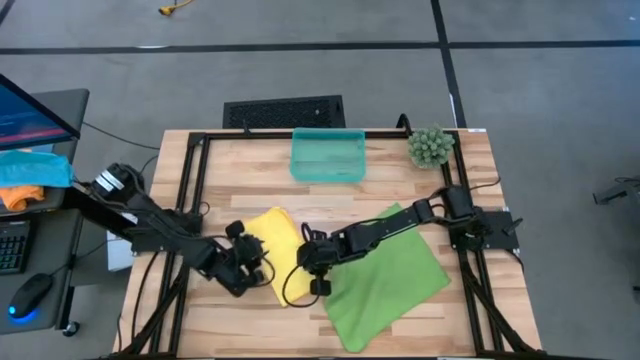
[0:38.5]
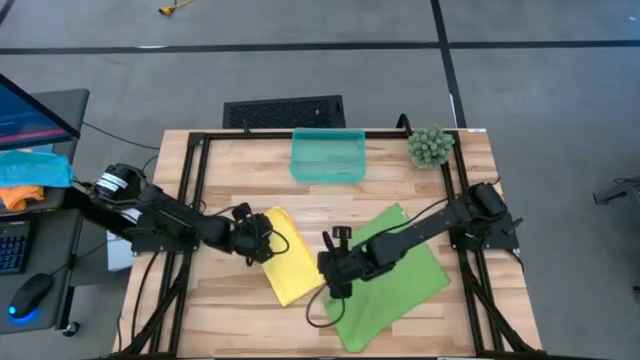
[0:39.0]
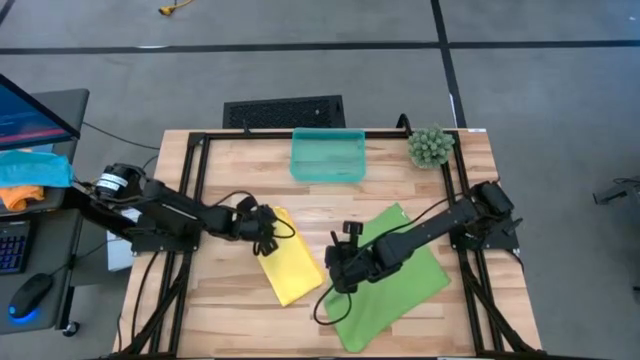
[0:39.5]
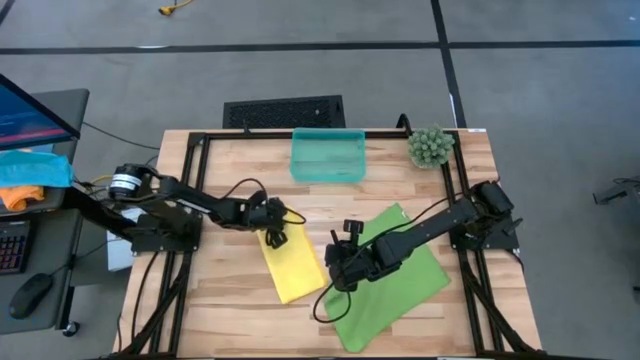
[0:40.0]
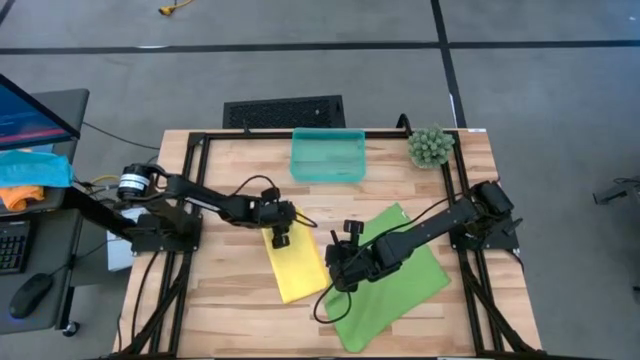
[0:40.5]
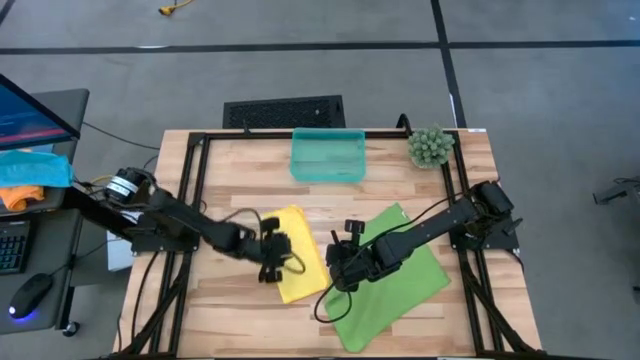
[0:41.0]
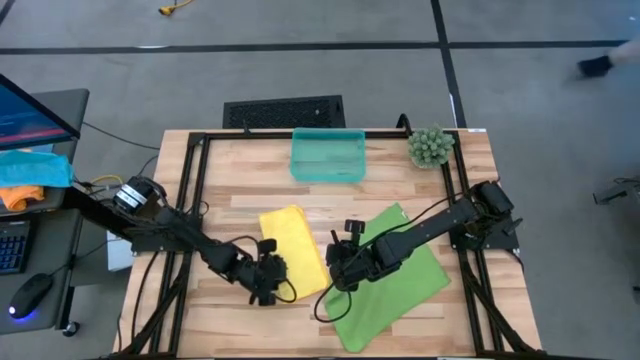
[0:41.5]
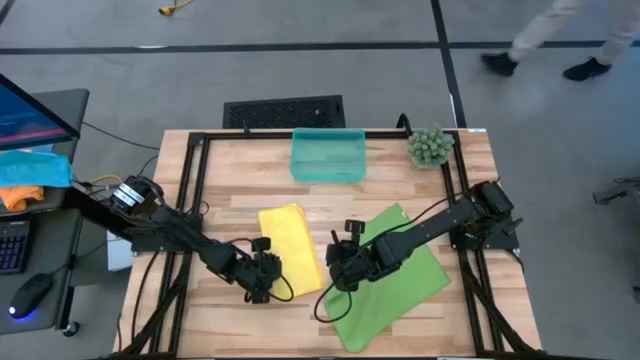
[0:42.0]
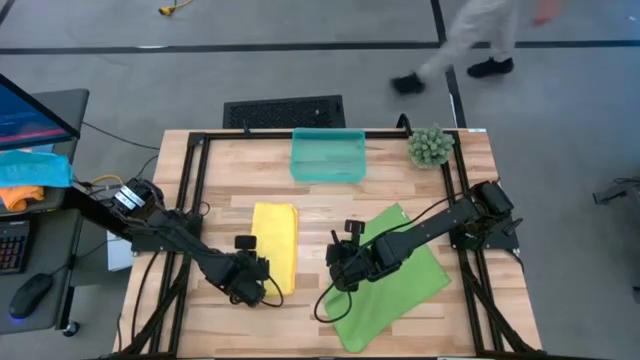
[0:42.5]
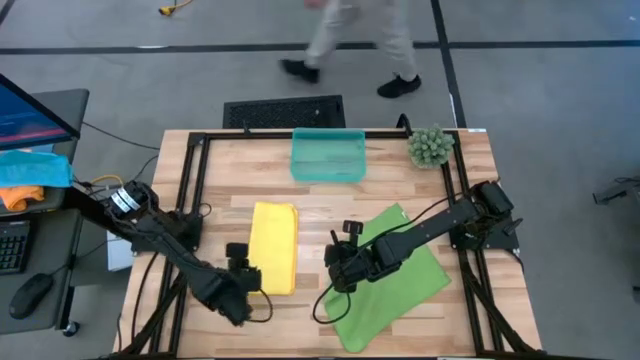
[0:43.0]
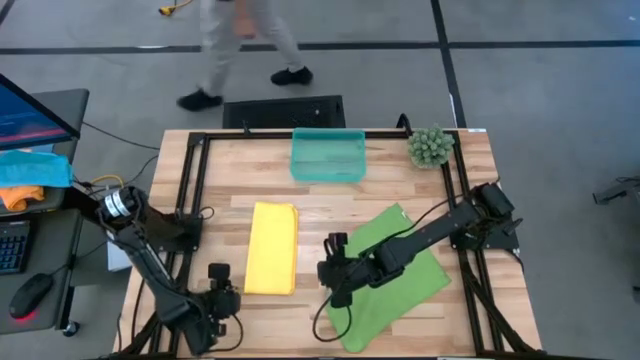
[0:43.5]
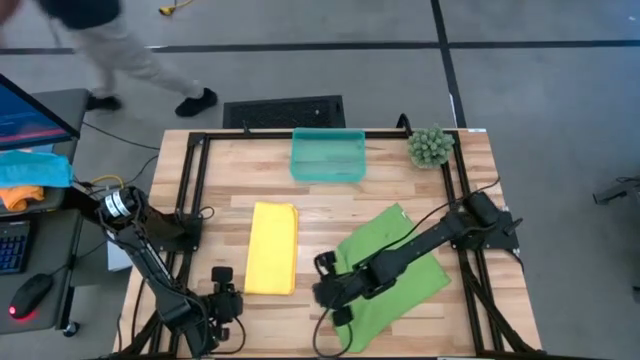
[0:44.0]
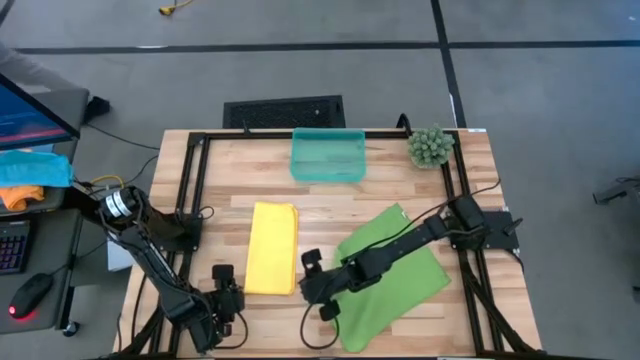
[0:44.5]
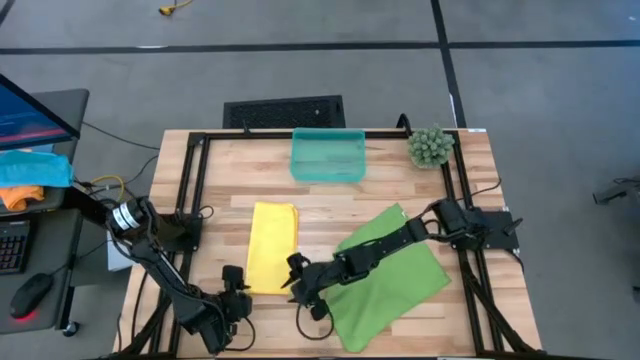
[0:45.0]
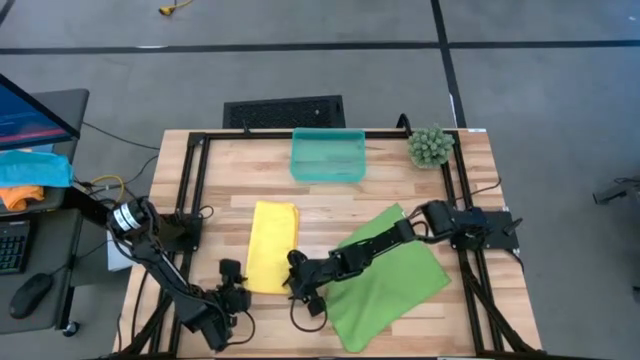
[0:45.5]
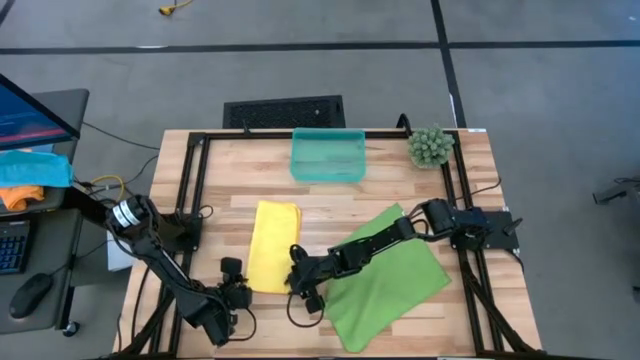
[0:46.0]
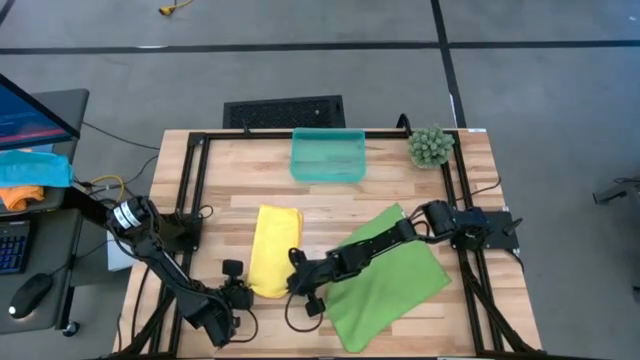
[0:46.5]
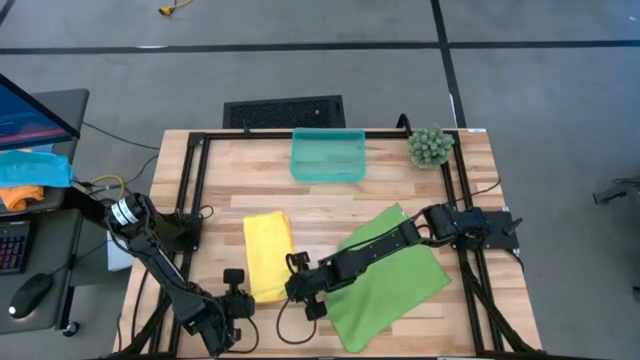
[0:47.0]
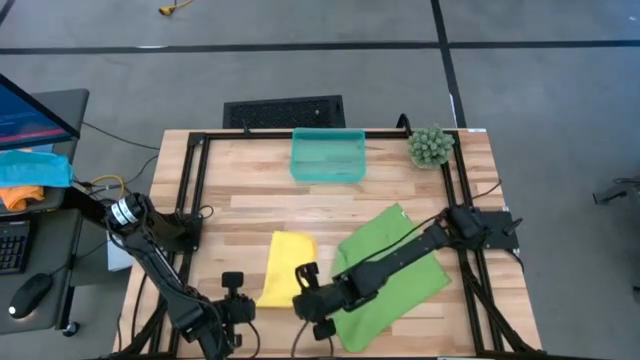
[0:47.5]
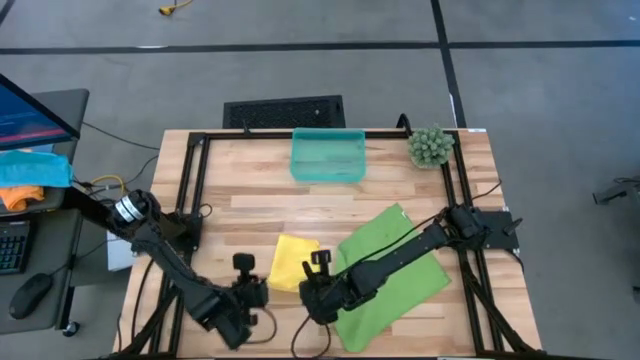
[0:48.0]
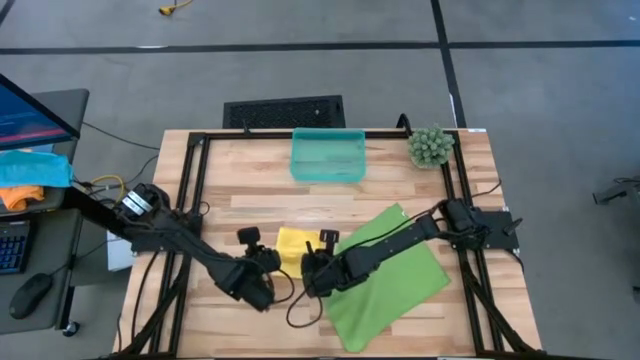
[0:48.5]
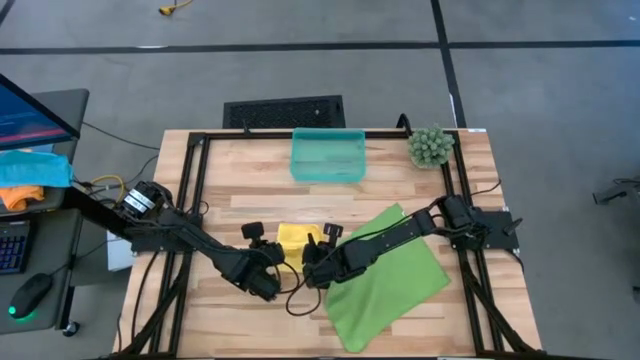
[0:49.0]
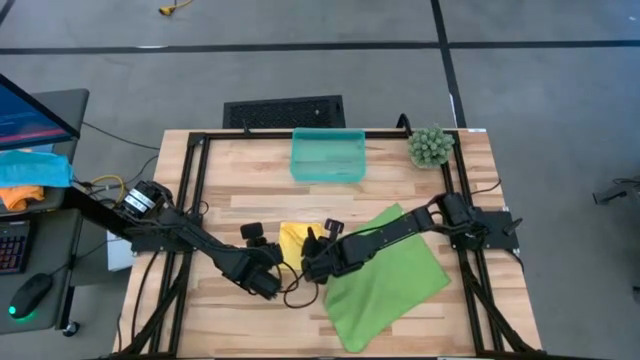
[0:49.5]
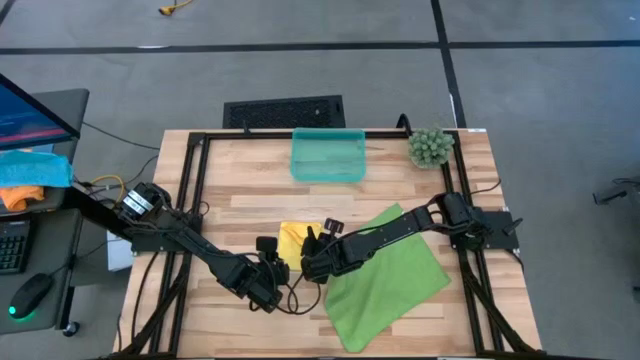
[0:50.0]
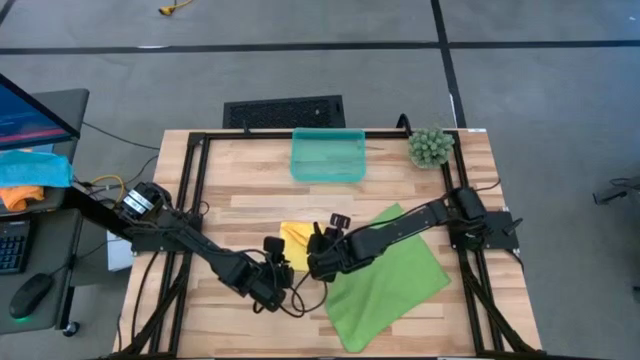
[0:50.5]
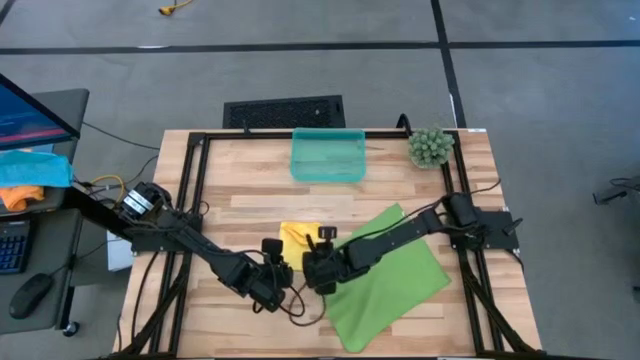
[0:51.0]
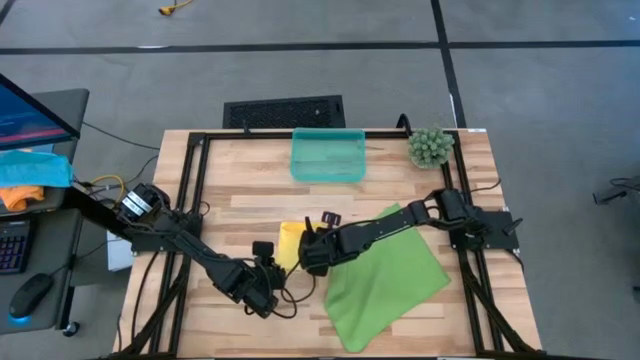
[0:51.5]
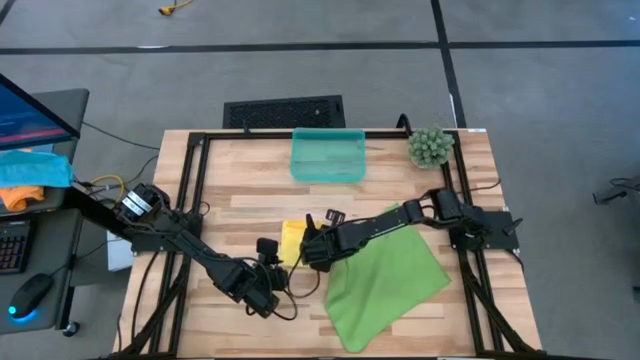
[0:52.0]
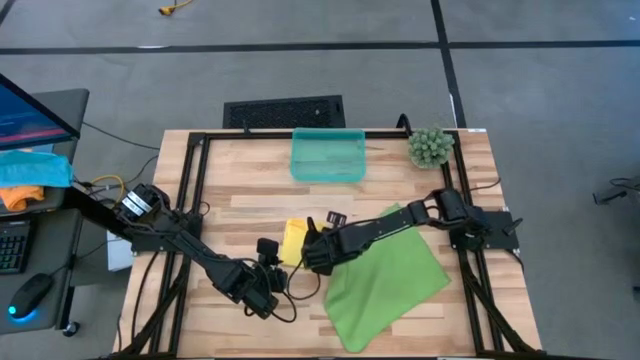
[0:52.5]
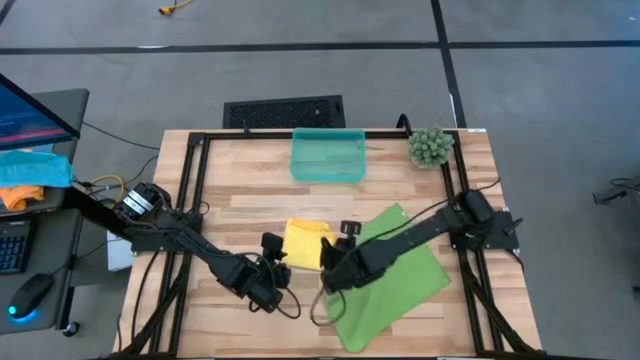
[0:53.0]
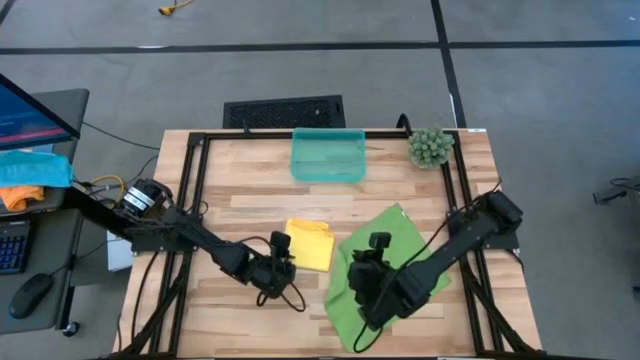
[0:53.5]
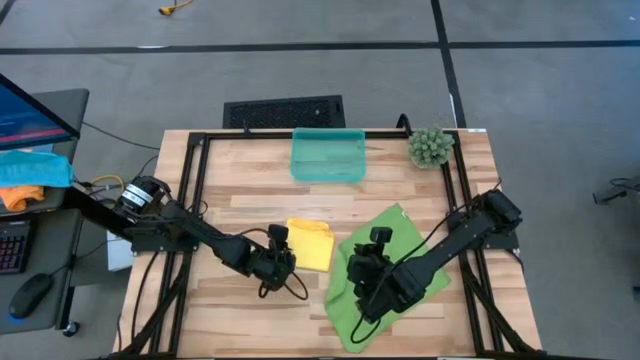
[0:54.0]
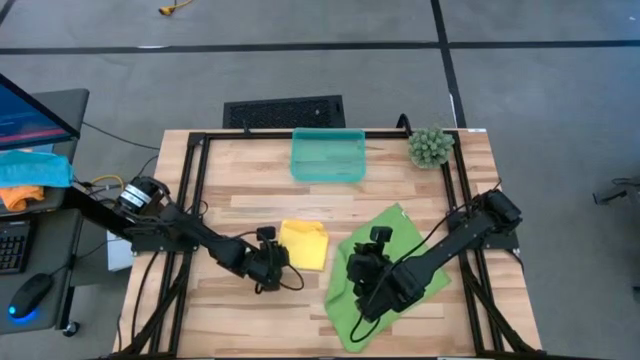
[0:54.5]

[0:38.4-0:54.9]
Task: Roll microfiber towels into tight, uniform cylinder then place into a basket
Fold the yellow microfiber towel

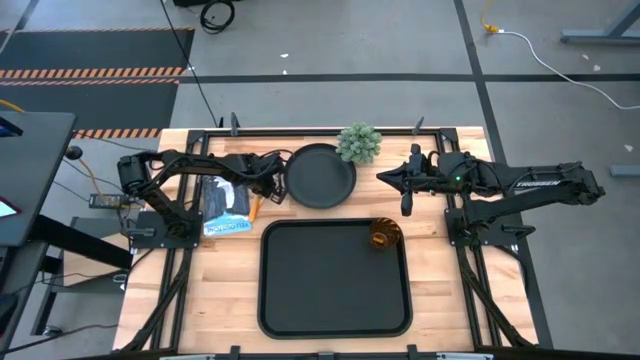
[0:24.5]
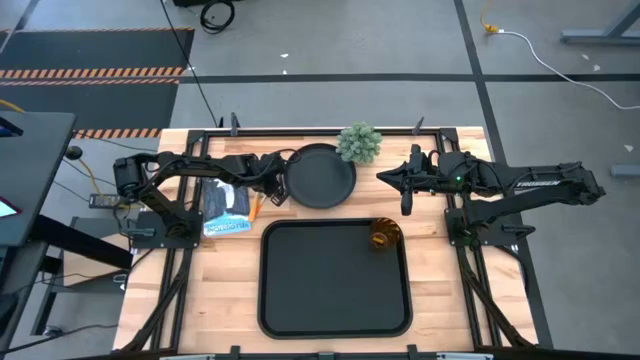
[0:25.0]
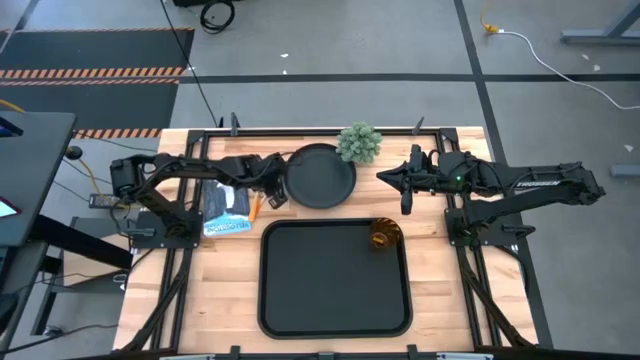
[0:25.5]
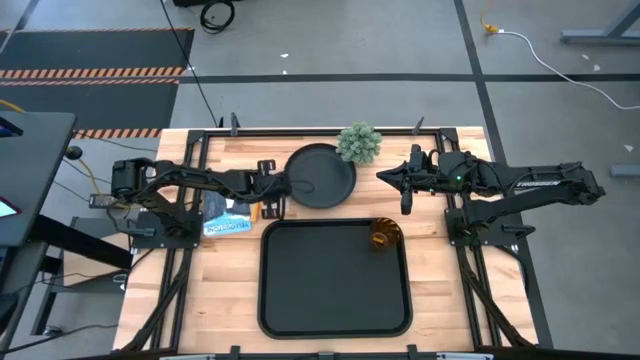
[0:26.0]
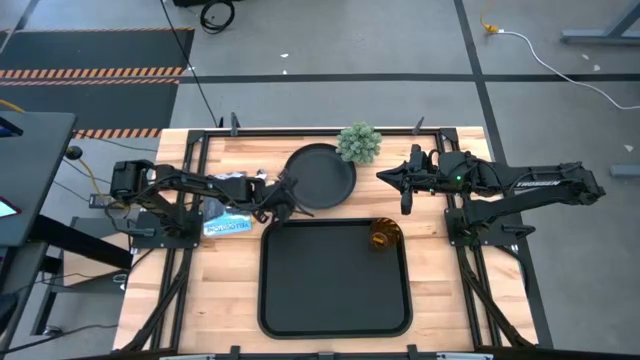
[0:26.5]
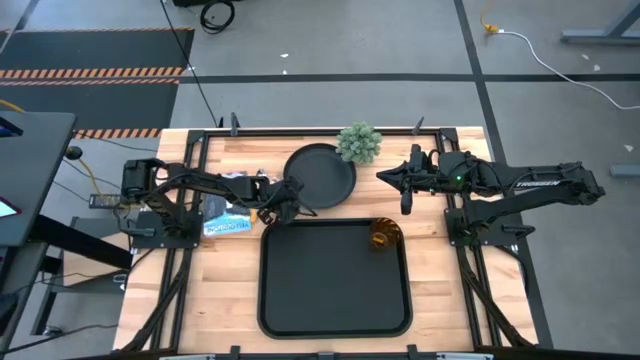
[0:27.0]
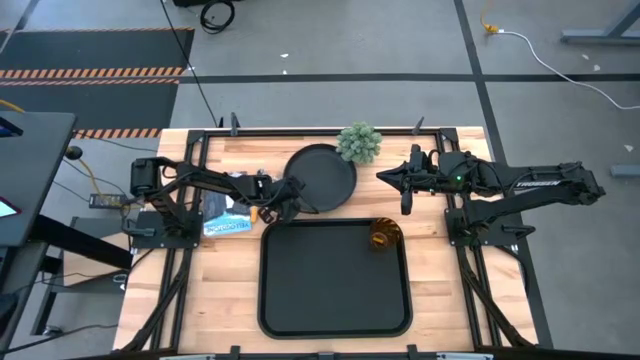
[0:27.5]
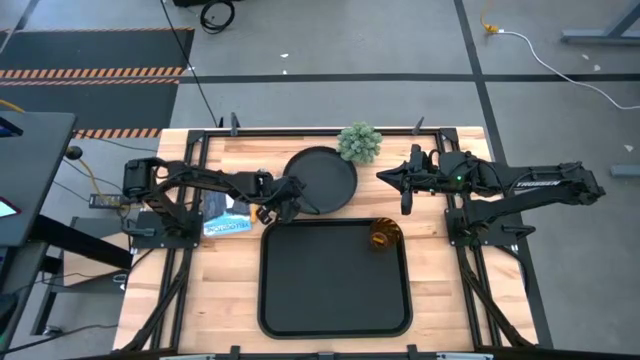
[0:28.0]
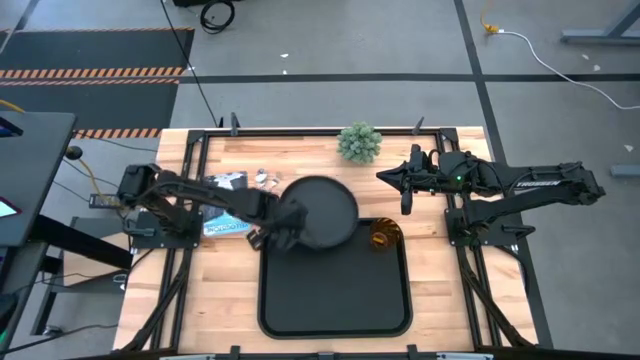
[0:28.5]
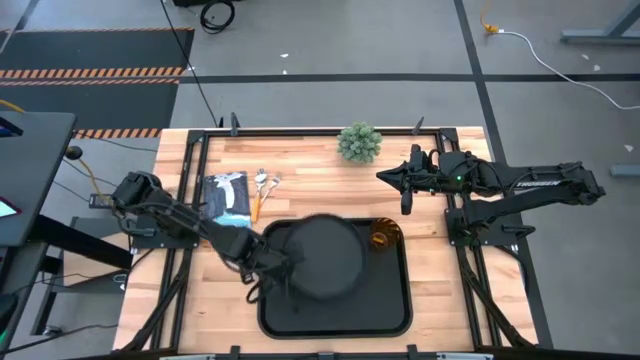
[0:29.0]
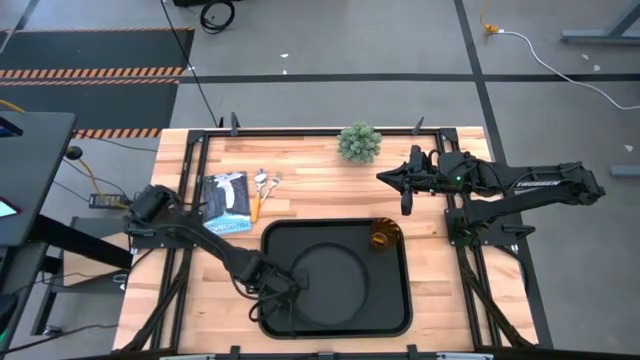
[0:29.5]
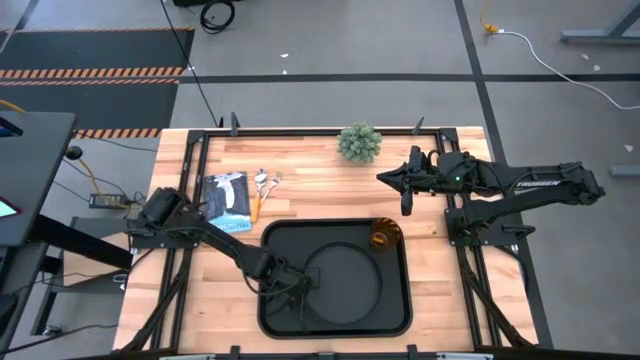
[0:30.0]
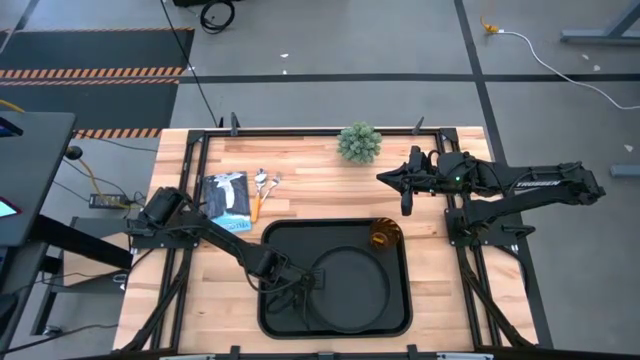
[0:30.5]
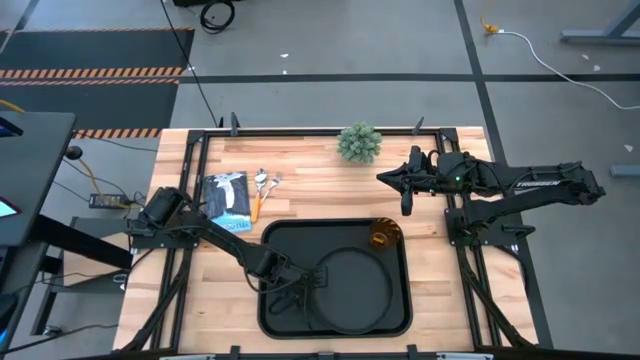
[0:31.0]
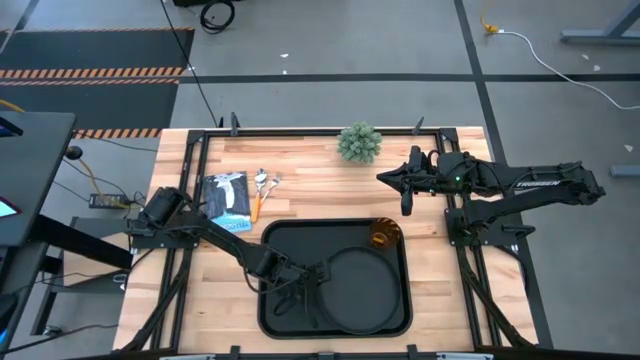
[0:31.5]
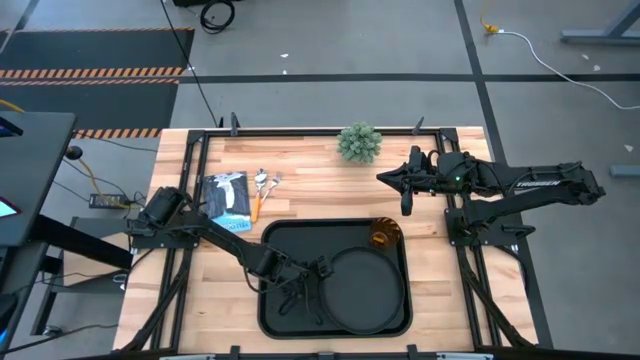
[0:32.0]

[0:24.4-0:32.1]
Task: Pick and place plate/cup/fork/spoon on tray
Put the black plate on the black tray
